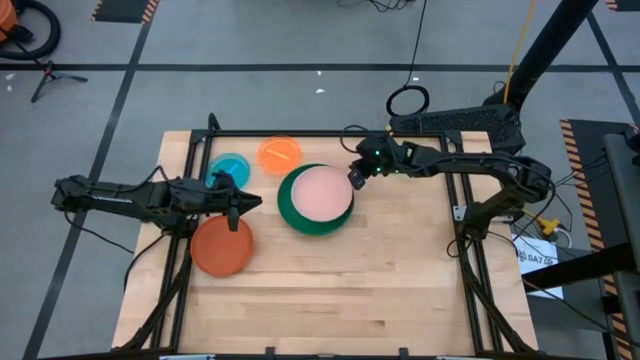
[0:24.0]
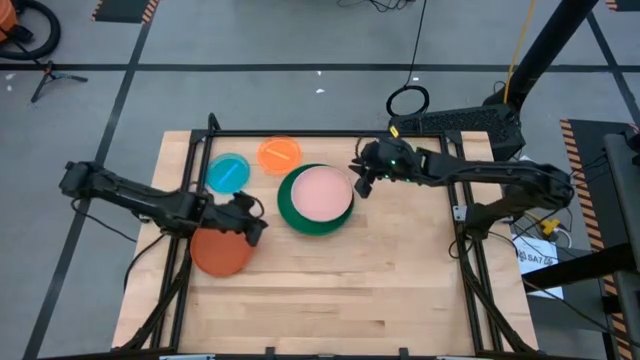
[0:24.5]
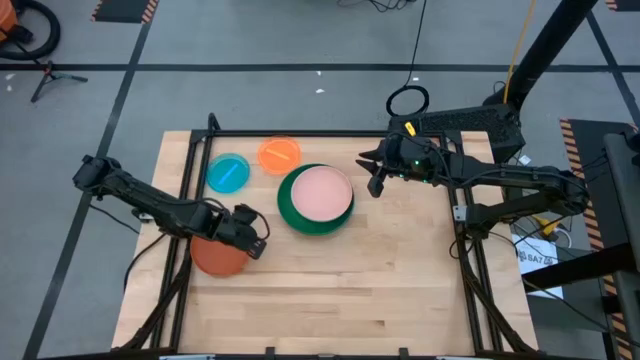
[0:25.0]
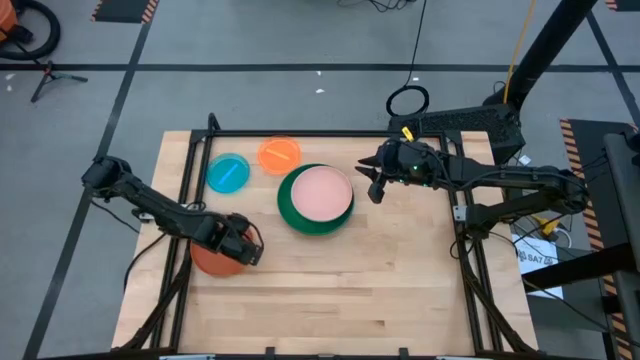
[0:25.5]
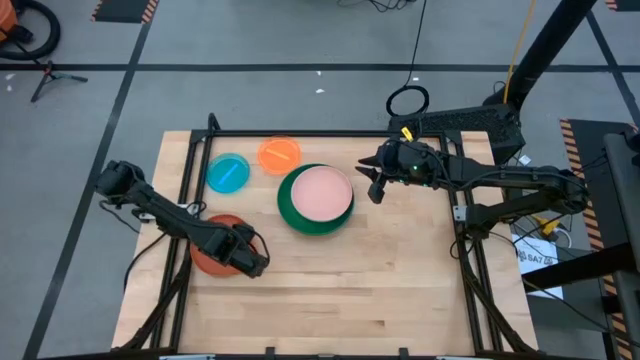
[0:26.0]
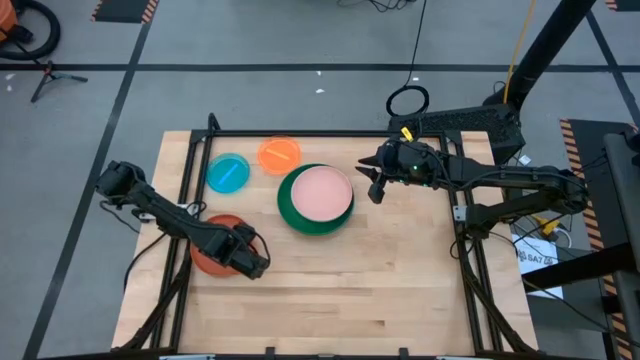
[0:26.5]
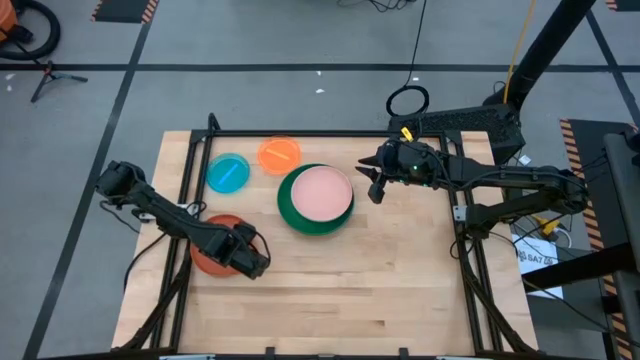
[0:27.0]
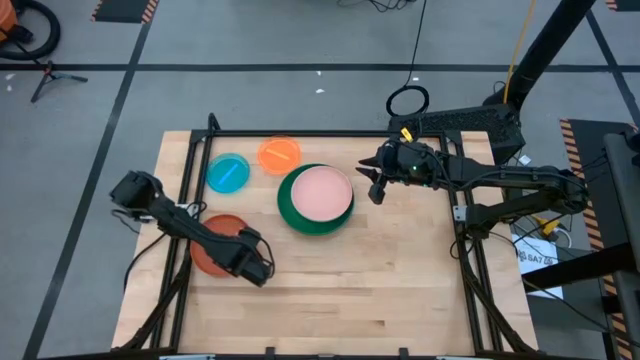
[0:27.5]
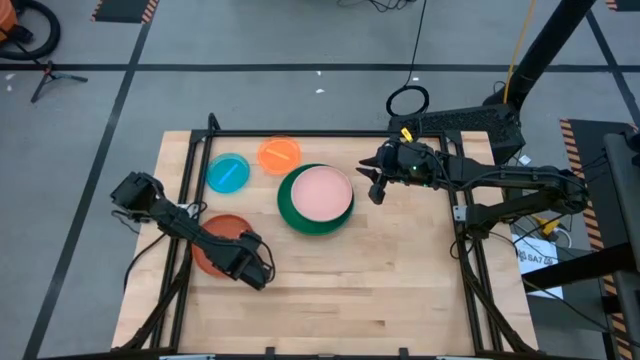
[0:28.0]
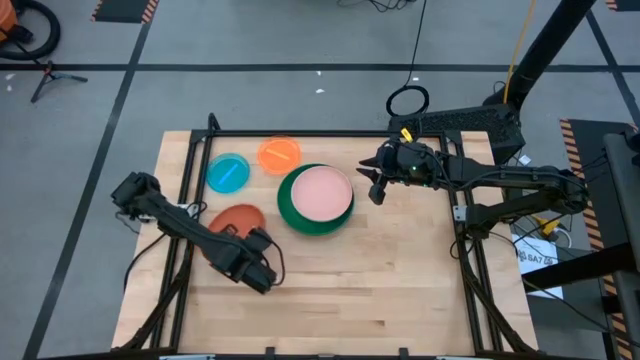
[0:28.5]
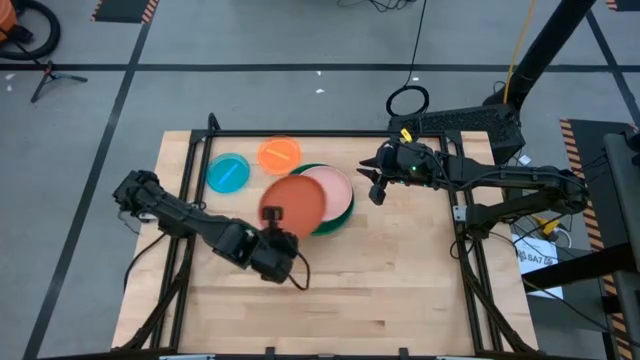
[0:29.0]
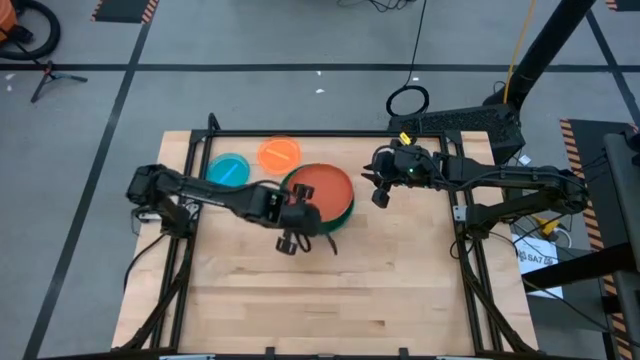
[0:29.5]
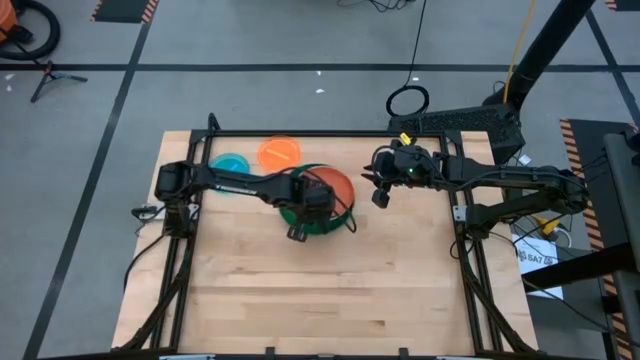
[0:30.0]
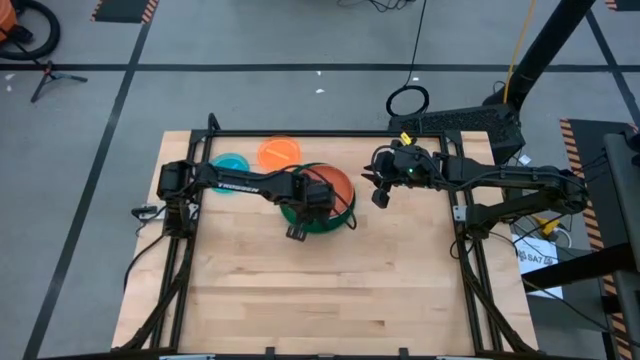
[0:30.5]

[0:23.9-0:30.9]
Task: Stack plastic plates
Stack the orange plate on top of the light orange plate

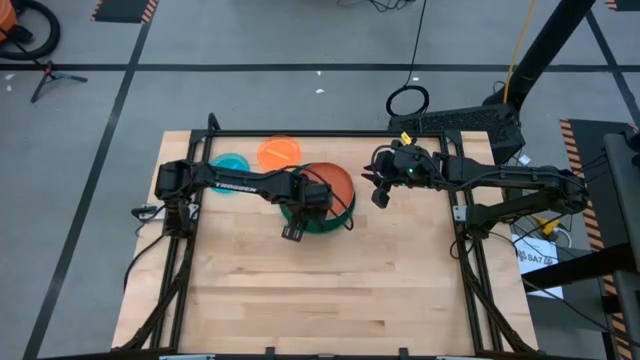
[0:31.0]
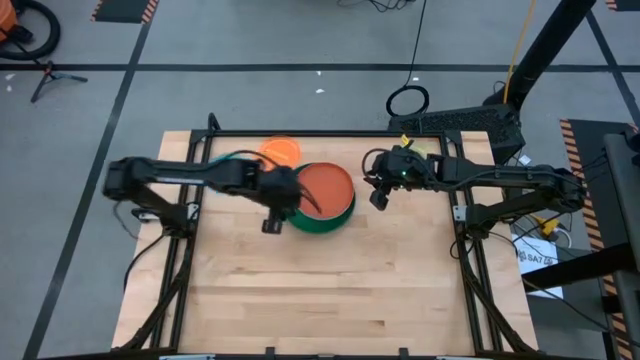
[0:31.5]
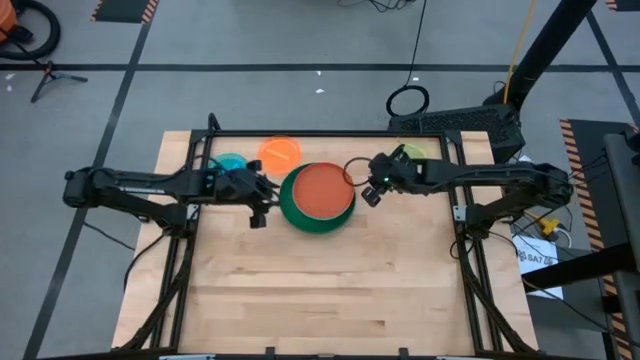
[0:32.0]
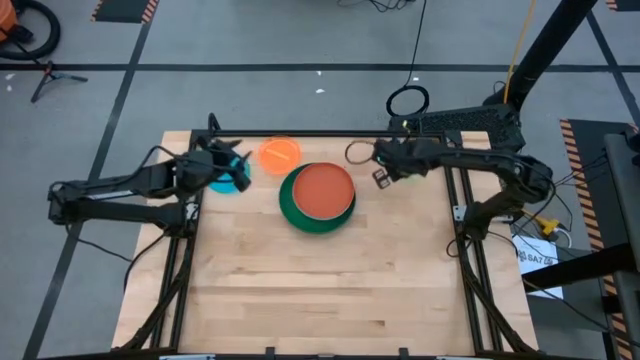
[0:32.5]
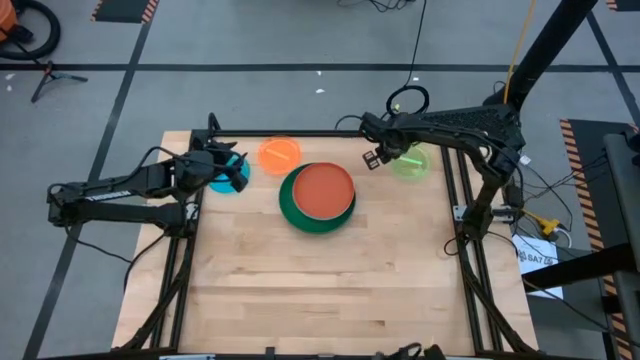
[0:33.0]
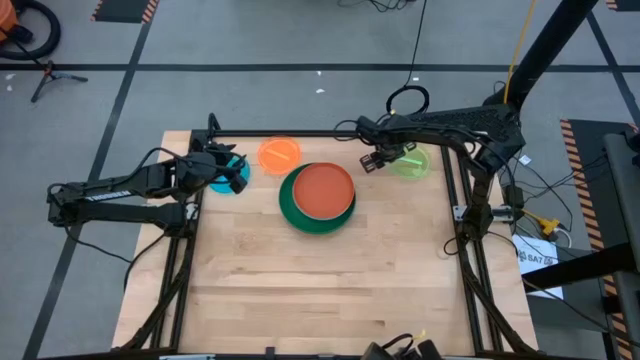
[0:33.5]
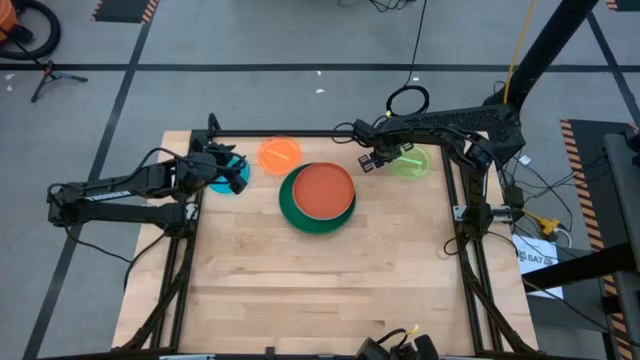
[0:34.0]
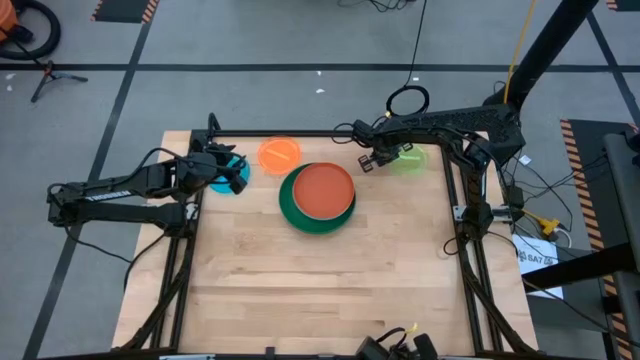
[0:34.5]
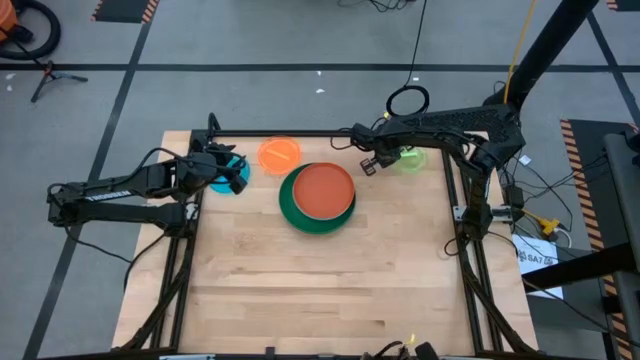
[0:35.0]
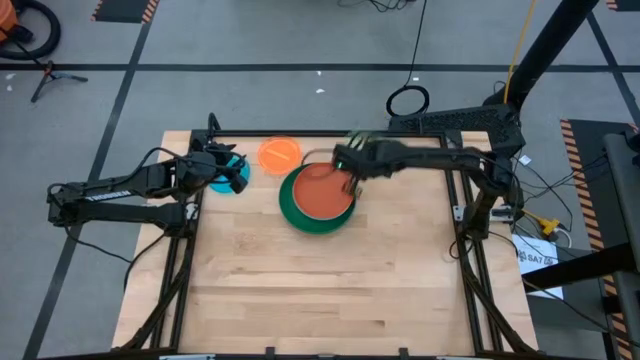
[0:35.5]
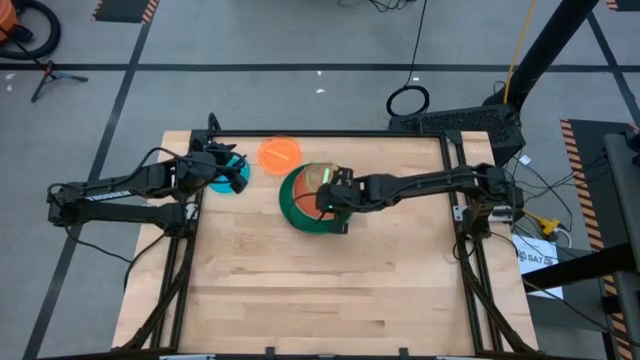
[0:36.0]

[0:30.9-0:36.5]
Stack the green plate on top of the orange plate

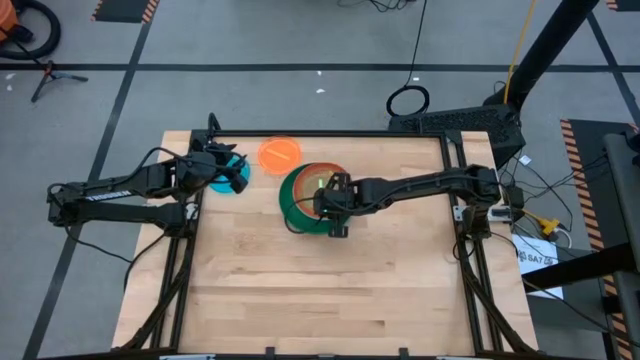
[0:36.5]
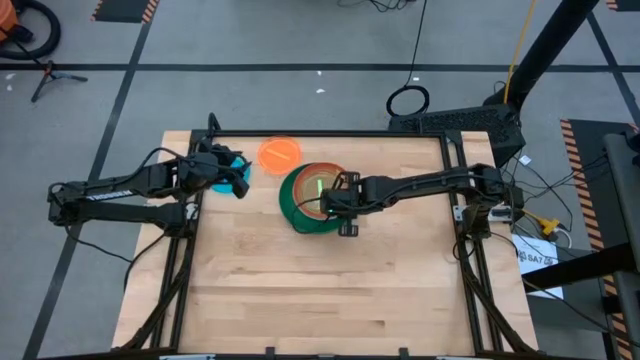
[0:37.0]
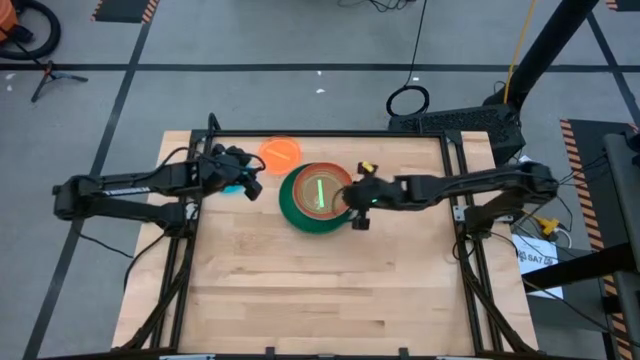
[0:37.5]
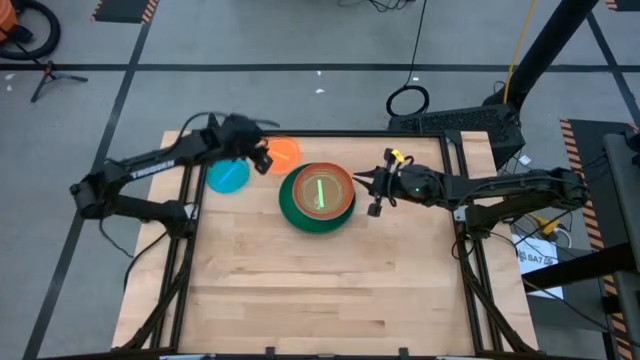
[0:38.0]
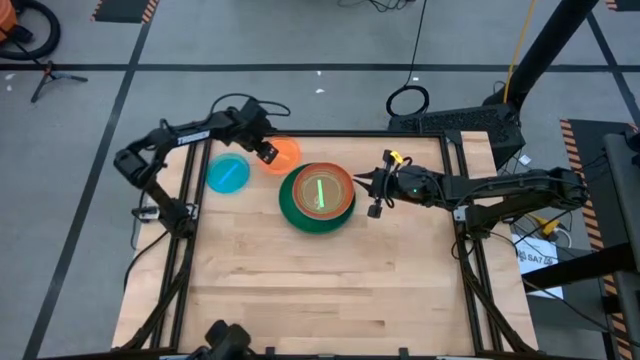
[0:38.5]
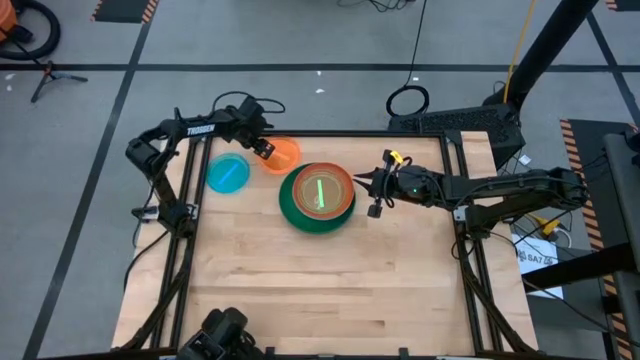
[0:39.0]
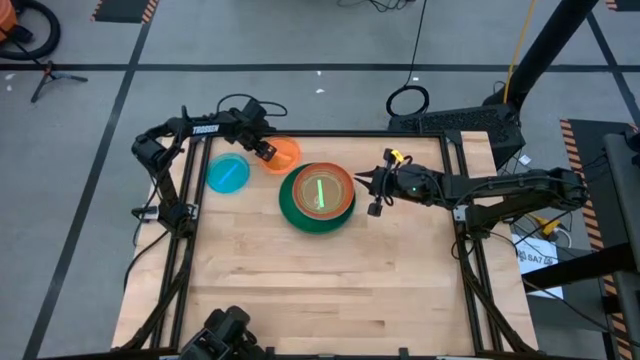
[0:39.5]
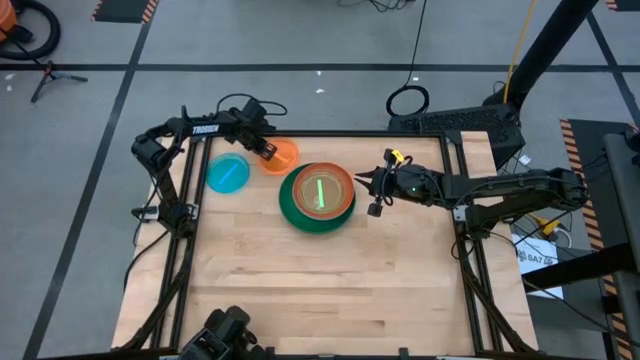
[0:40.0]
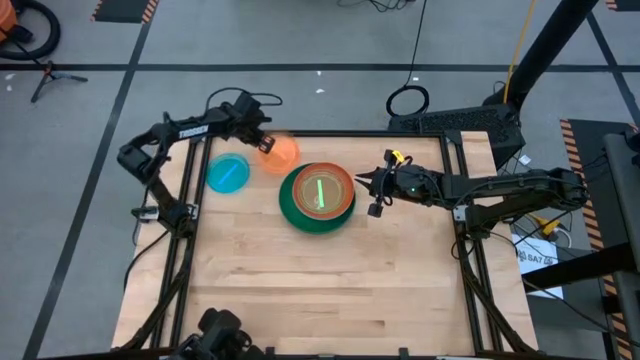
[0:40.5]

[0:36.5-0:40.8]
Stack the orange plate on top of the green plate

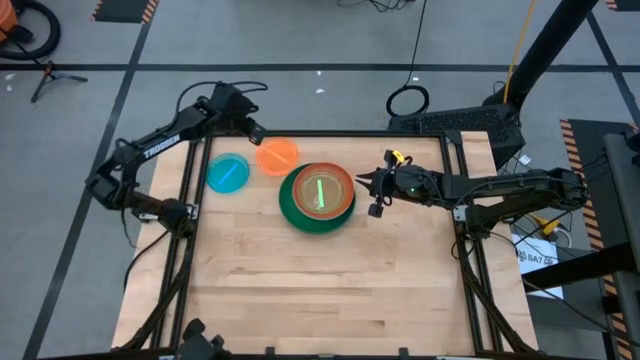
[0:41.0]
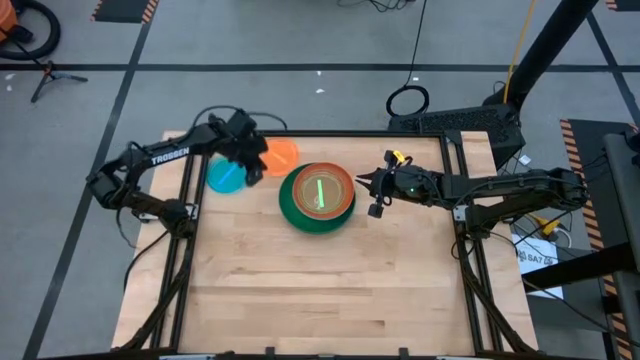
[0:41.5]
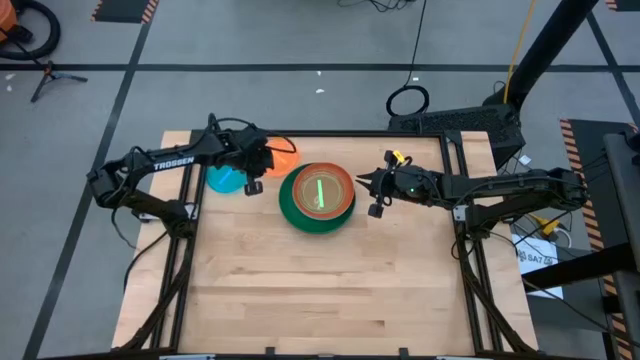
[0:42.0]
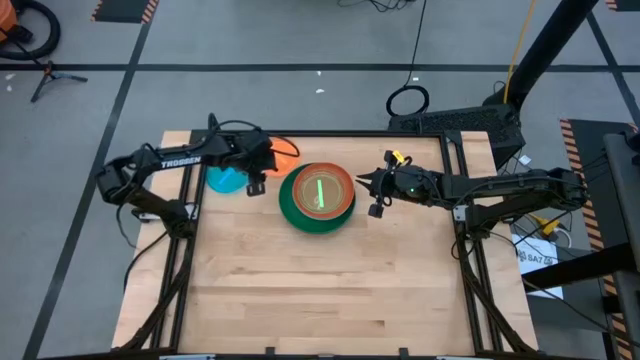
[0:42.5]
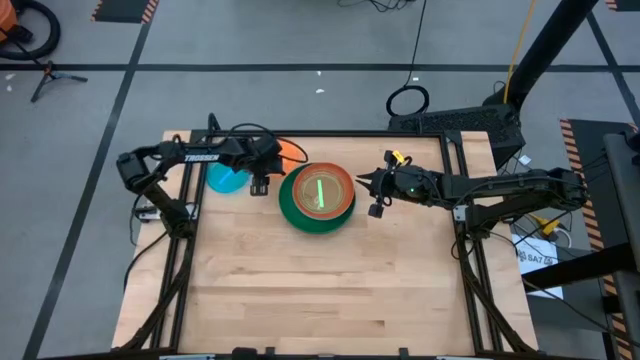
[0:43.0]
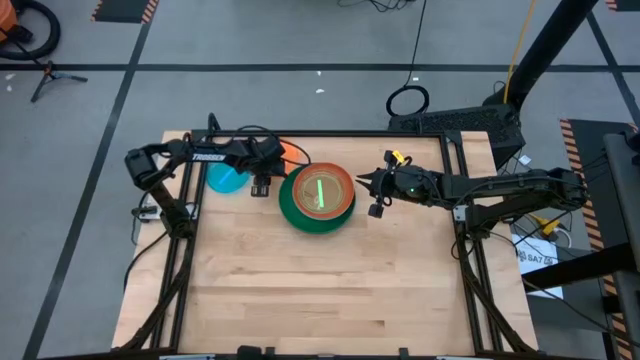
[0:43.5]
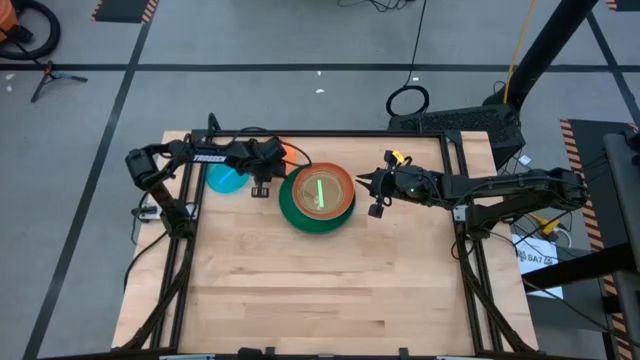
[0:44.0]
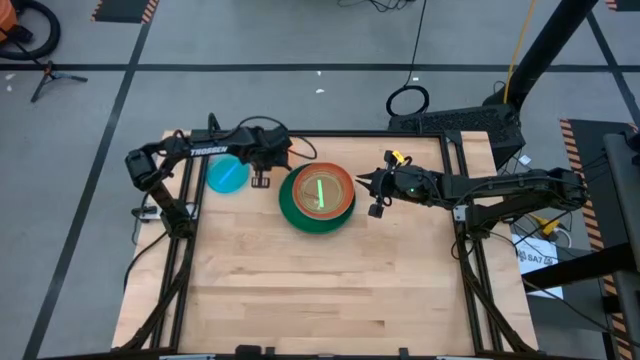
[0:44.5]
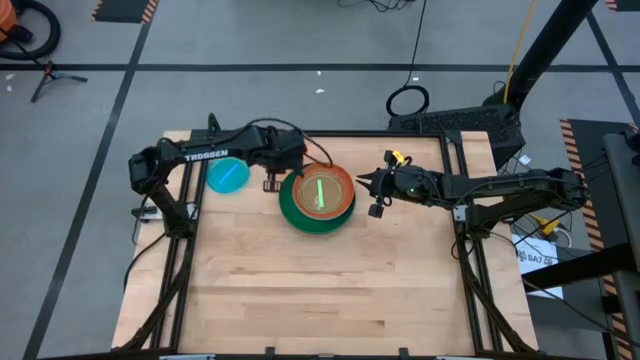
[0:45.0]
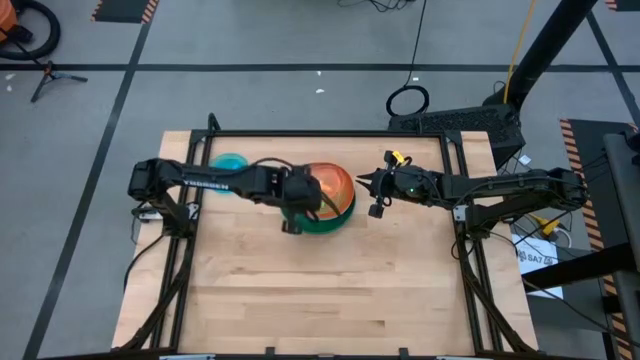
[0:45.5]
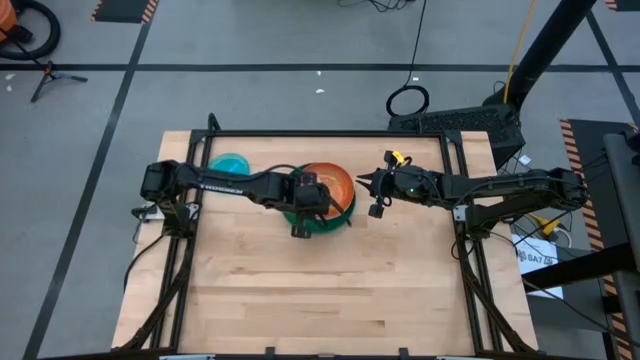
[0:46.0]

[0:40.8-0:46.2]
Stack the orange plate on top of the green plate
